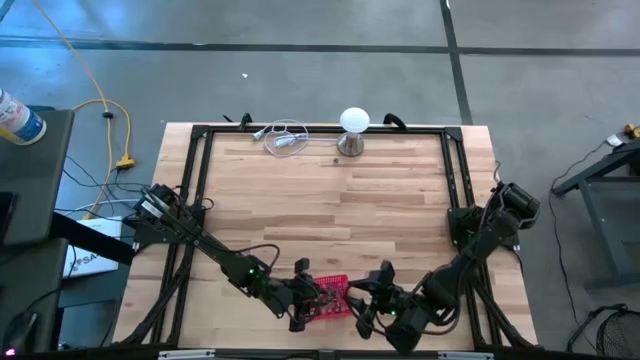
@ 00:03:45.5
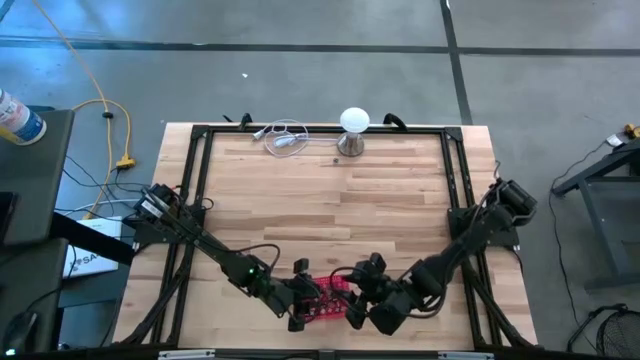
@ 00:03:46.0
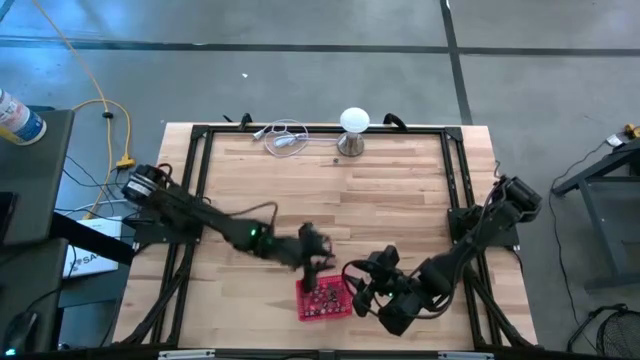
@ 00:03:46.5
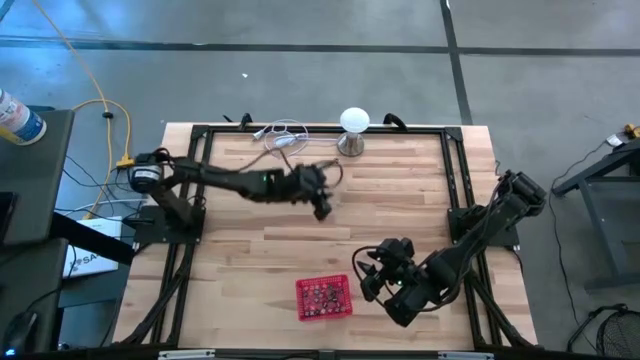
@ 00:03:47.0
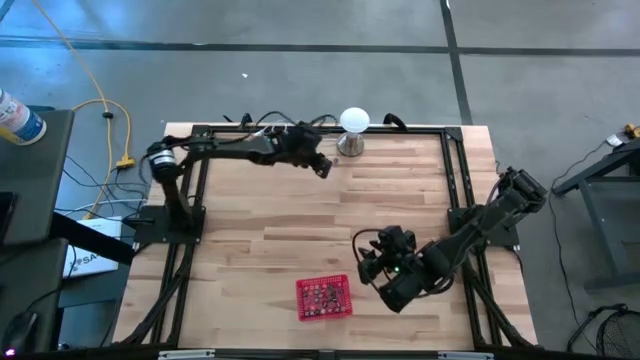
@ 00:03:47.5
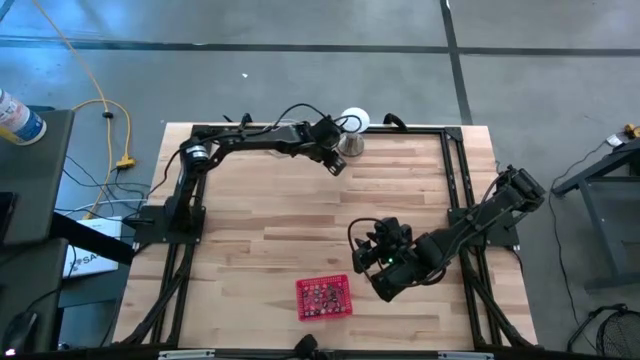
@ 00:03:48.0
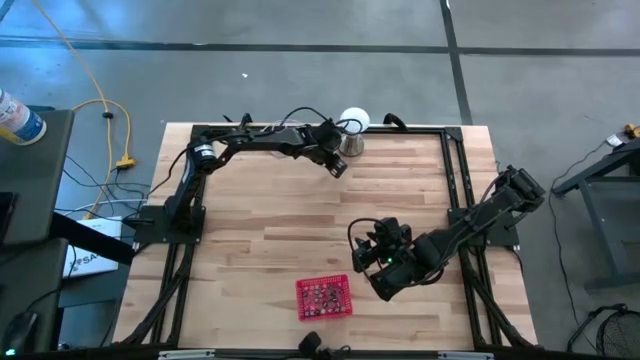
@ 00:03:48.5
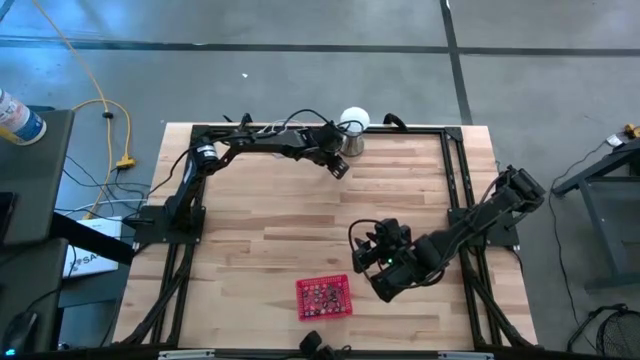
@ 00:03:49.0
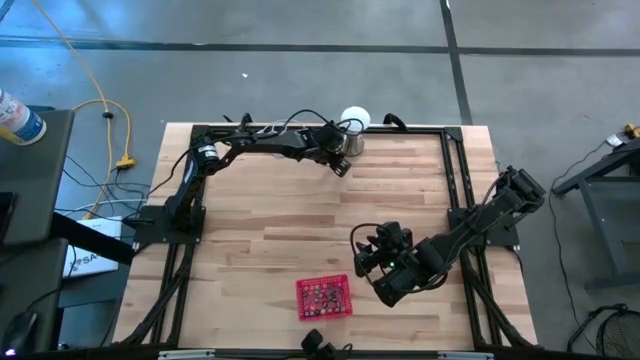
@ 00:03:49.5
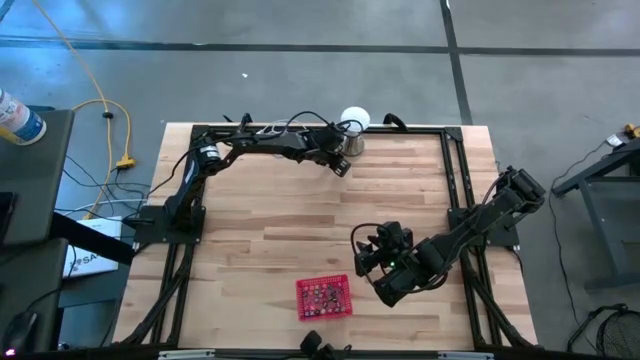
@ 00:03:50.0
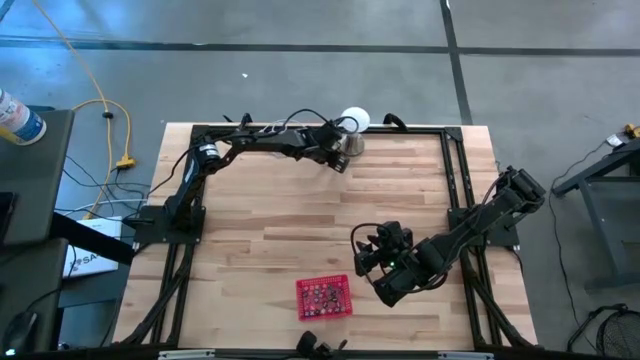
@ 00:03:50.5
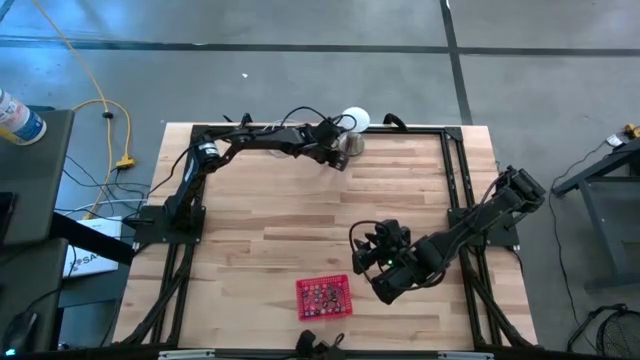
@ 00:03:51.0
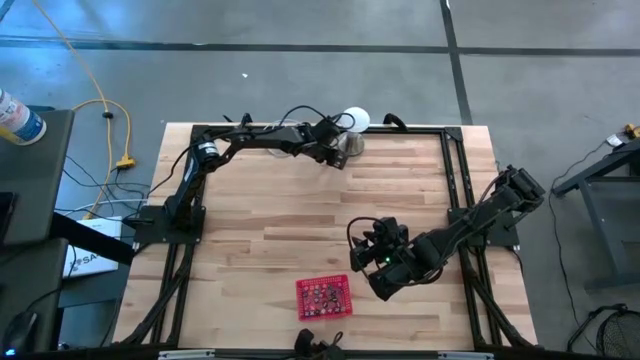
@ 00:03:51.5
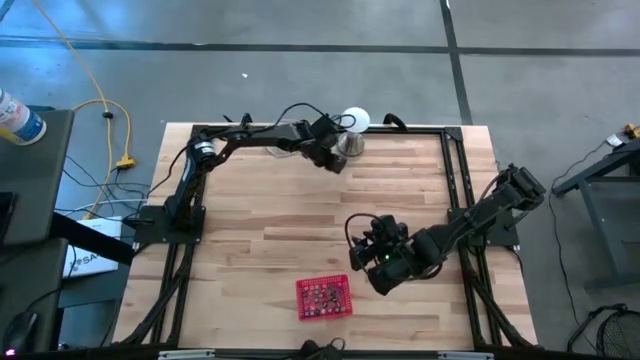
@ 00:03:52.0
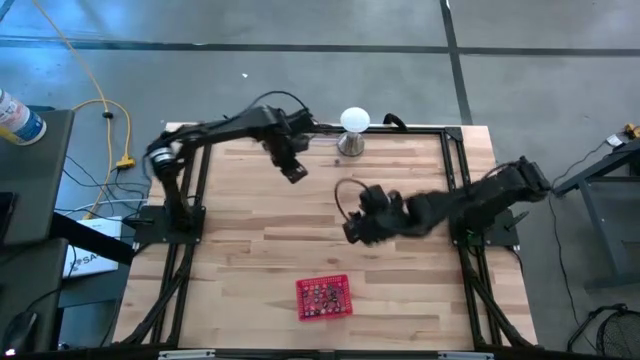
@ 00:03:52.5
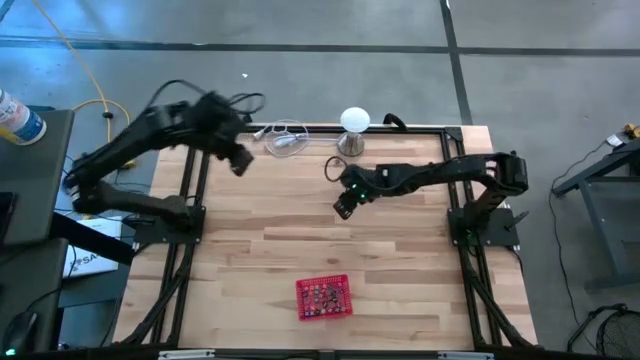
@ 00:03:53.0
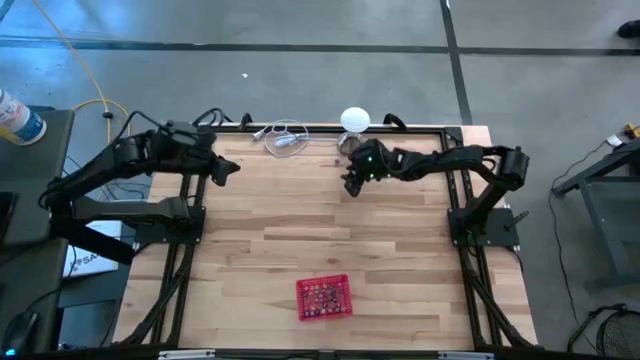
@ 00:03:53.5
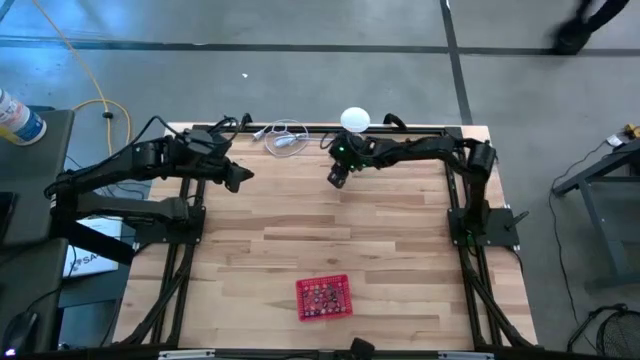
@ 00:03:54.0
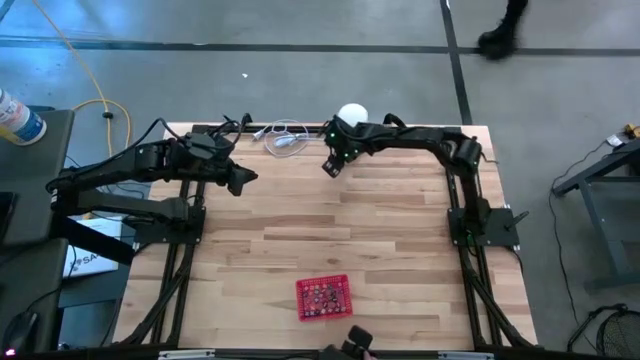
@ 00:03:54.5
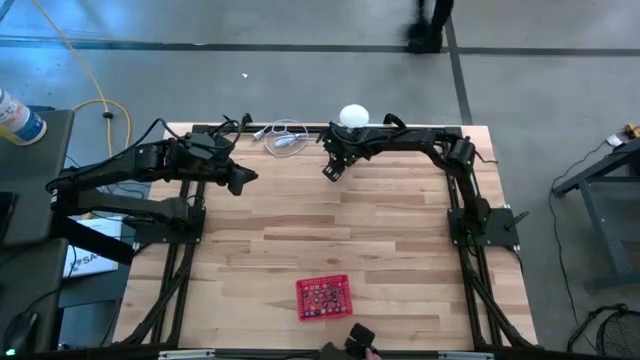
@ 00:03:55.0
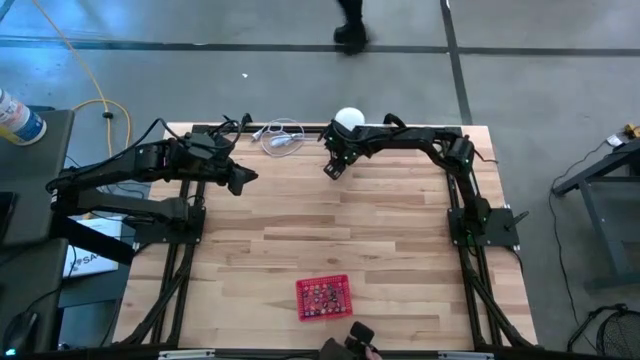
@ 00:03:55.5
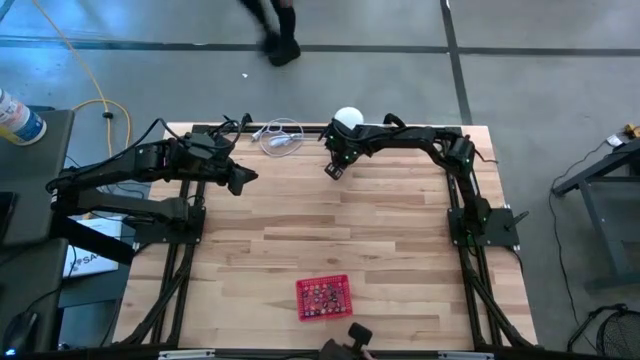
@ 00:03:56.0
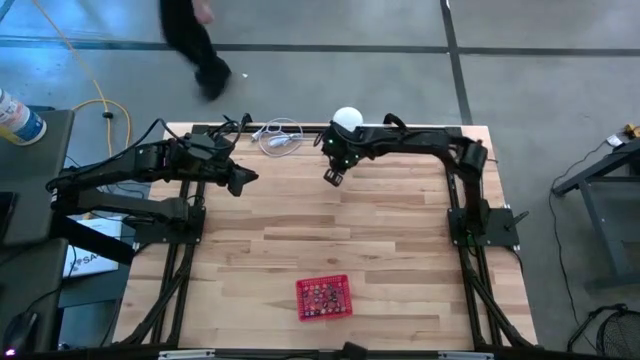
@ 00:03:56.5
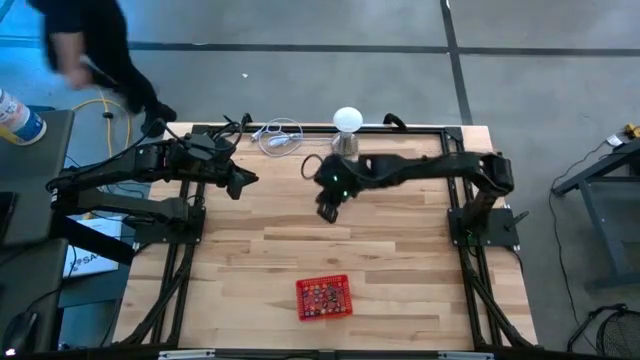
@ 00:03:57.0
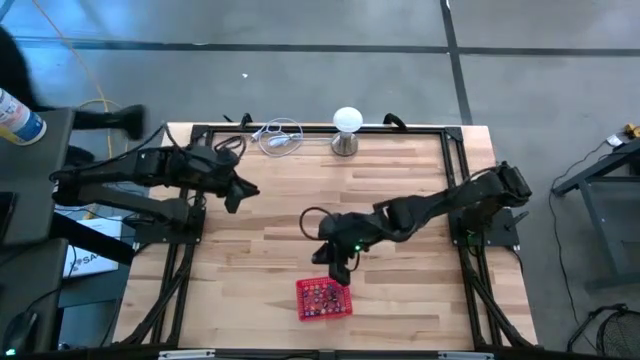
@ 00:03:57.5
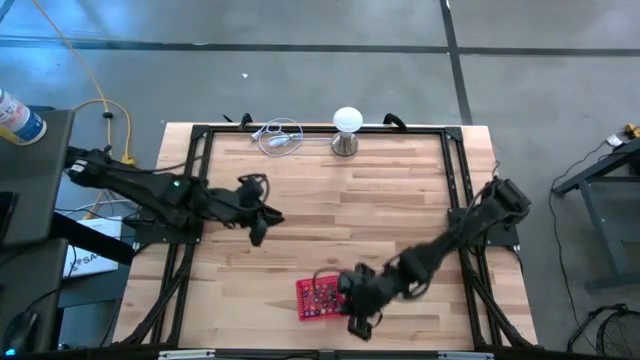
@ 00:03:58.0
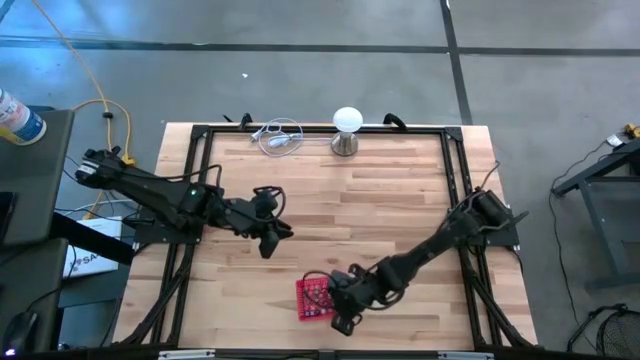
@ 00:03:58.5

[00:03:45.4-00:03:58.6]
Task: Pick & Place Dice
Put the dark blue dice into the red bin

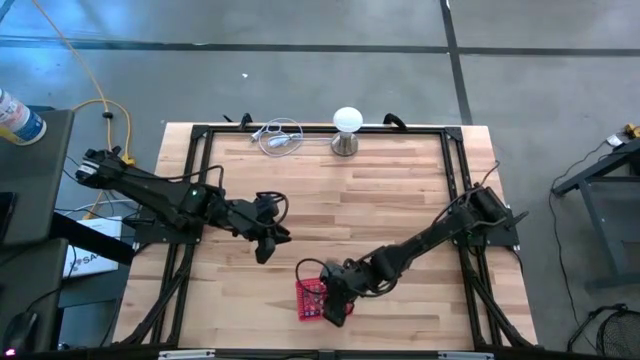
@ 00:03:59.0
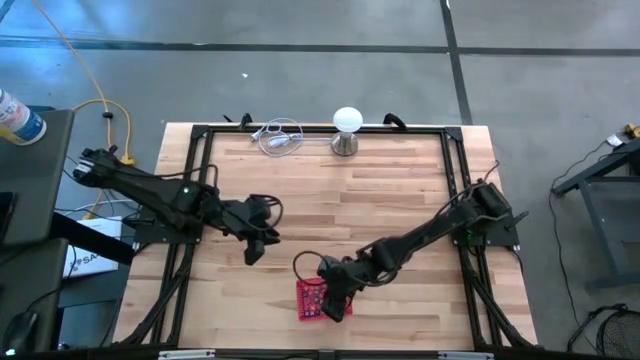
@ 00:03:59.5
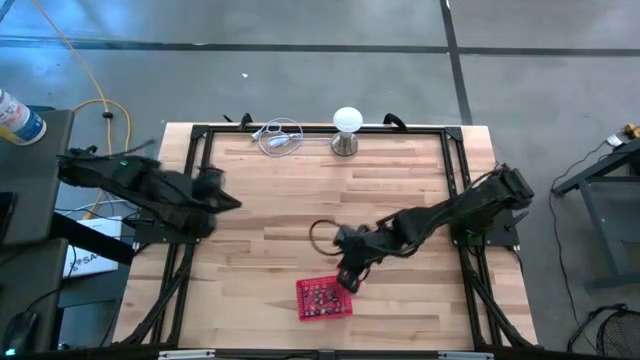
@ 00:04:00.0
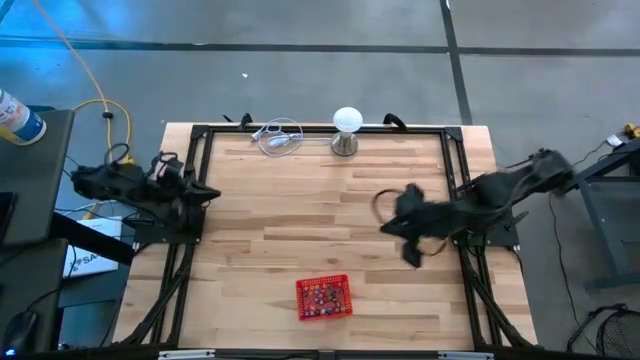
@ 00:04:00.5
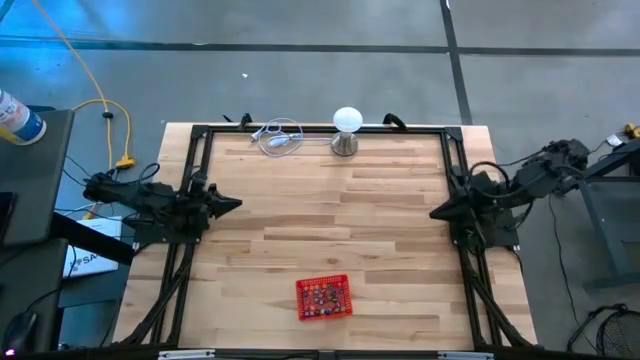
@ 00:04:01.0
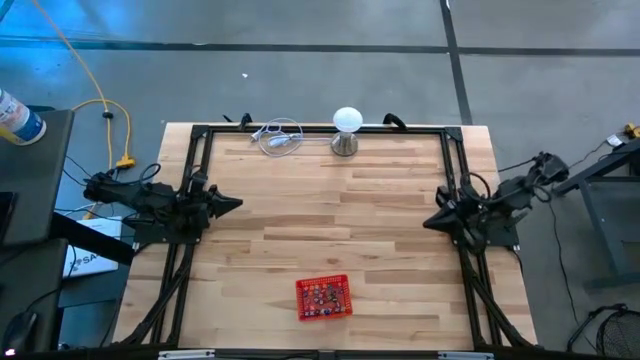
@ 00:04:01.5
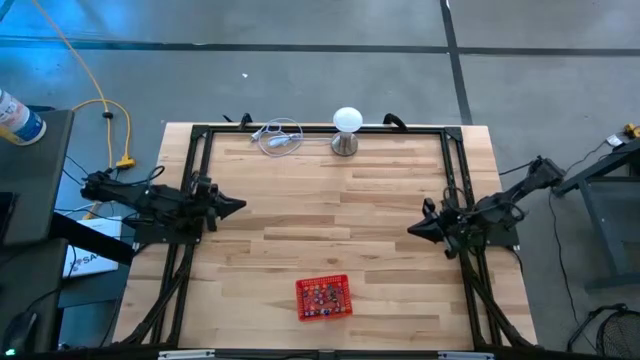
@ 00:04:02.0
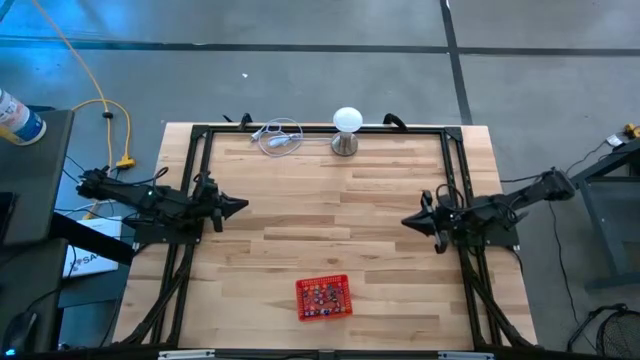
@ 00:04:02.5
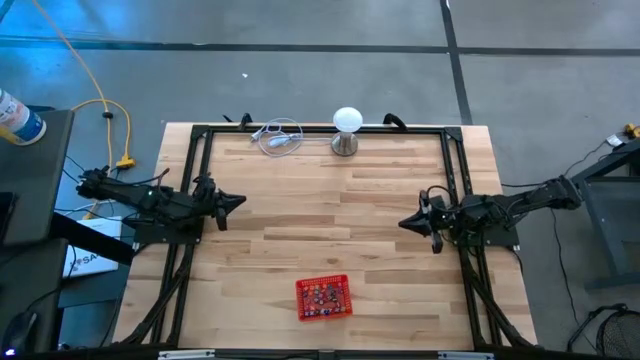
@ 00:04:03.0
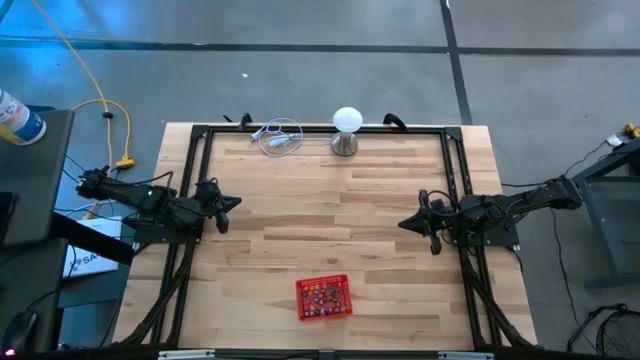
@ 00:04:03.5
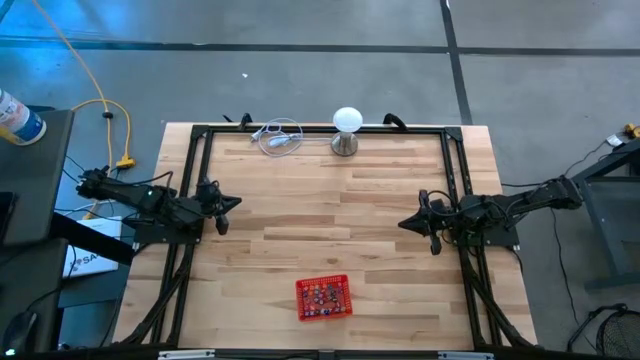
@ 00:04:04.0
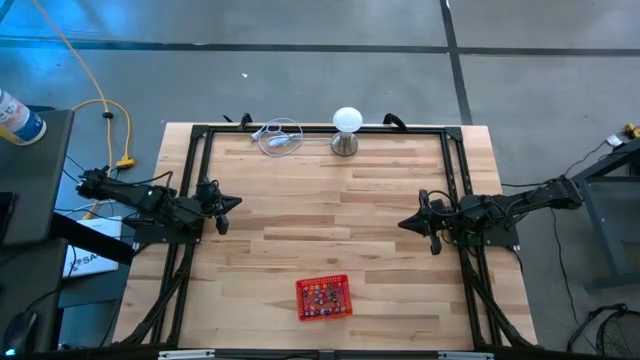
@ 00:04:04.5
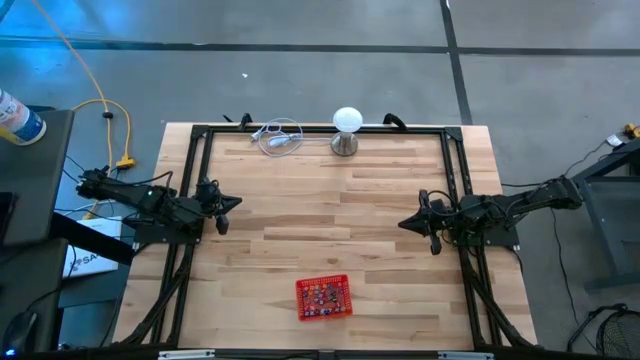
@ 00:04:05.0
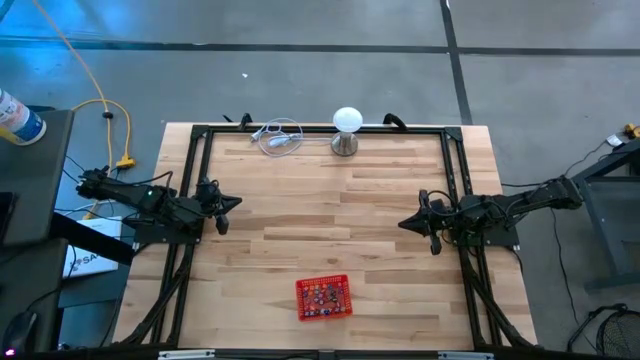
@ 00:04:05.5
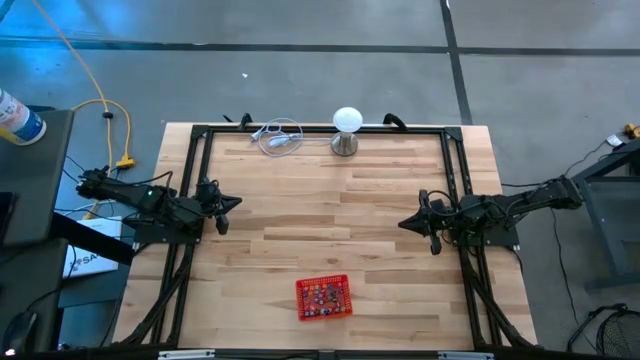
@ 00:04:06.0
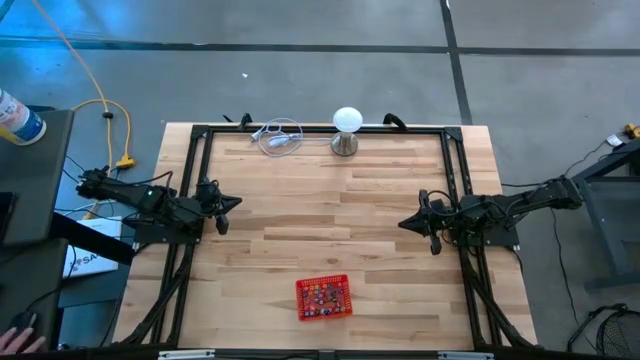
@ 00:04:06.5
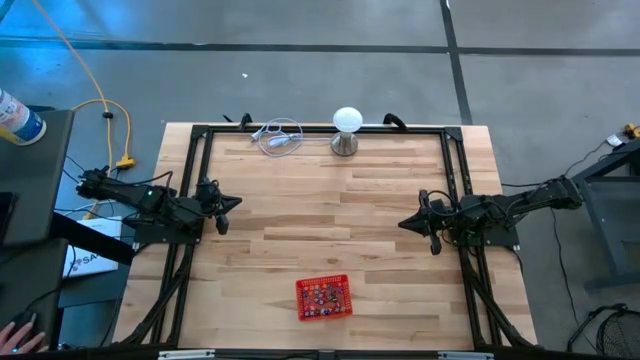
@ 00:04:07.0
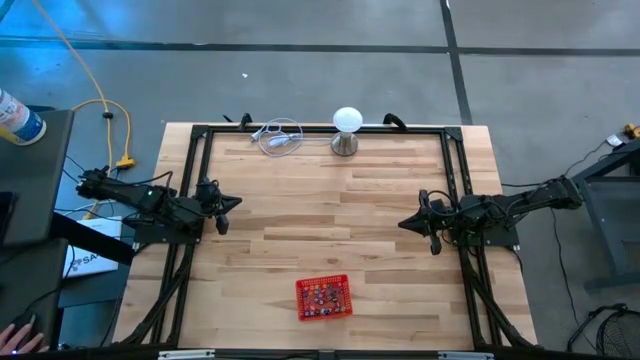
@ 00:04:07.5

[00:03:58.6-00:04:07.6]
Return to Home Position
